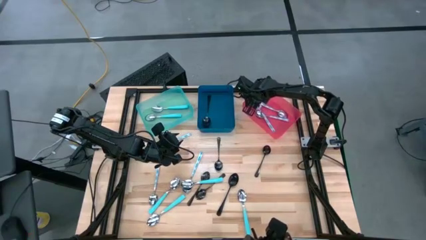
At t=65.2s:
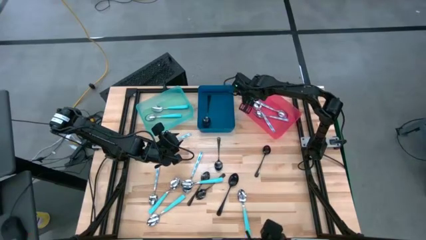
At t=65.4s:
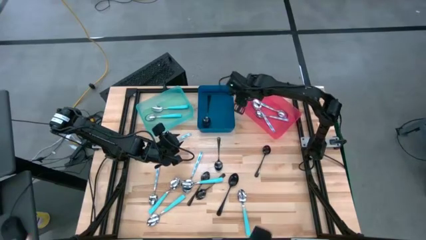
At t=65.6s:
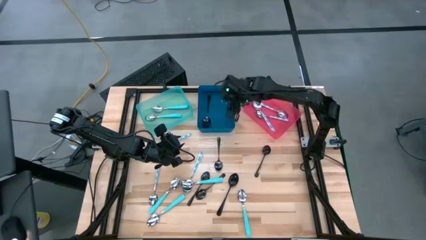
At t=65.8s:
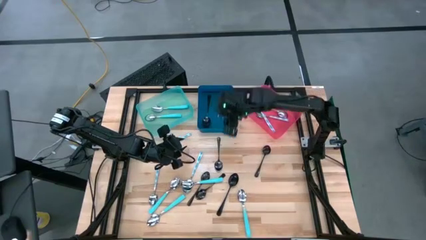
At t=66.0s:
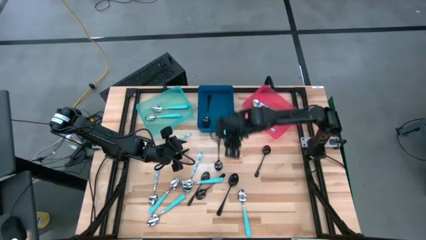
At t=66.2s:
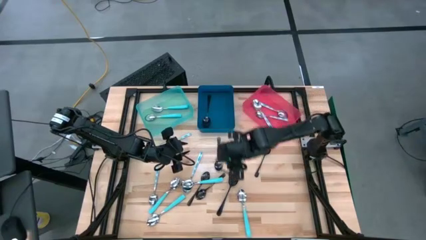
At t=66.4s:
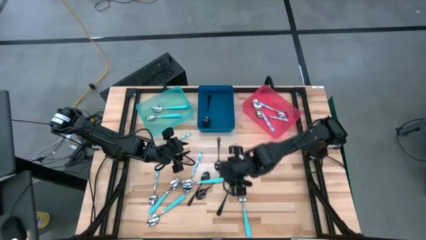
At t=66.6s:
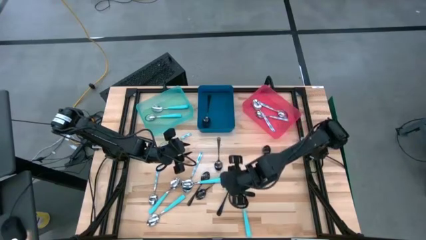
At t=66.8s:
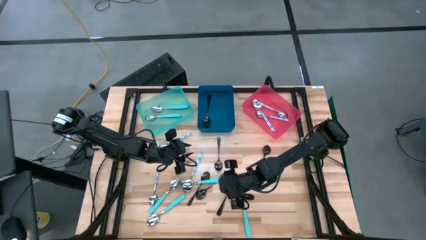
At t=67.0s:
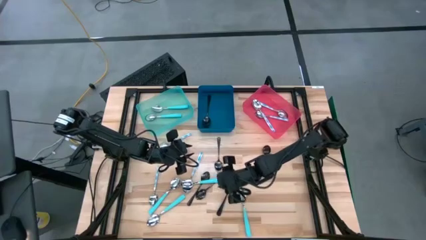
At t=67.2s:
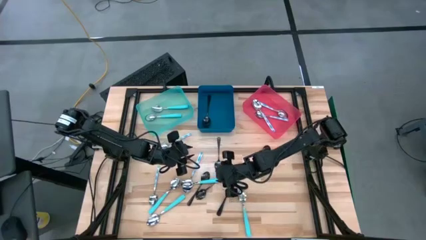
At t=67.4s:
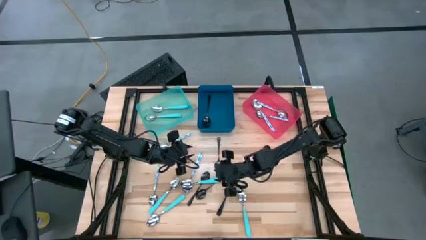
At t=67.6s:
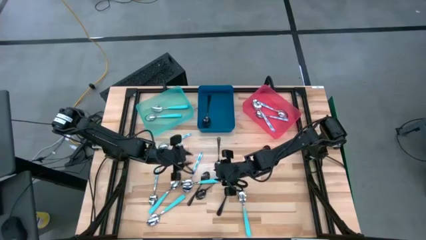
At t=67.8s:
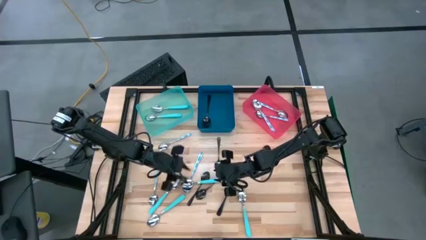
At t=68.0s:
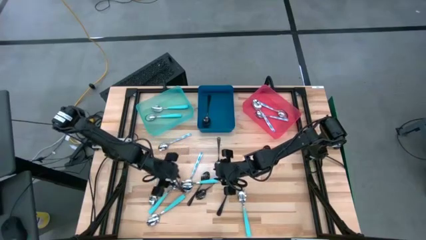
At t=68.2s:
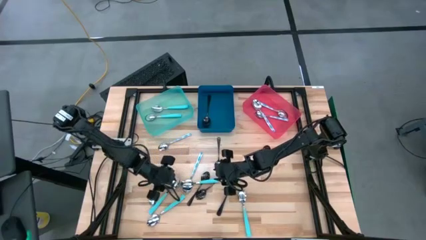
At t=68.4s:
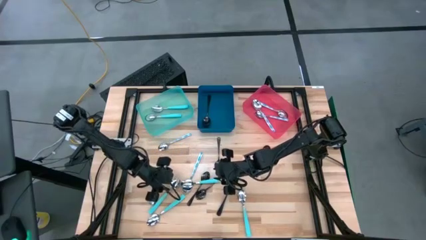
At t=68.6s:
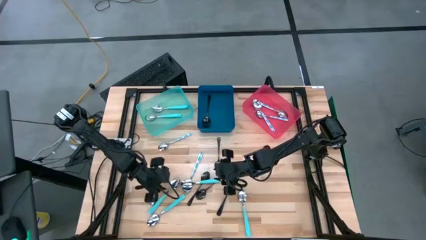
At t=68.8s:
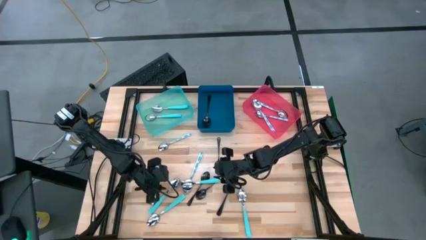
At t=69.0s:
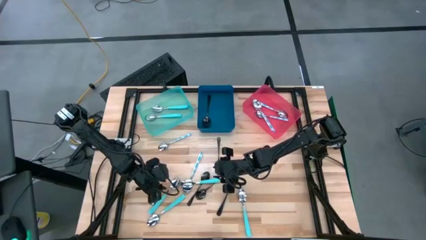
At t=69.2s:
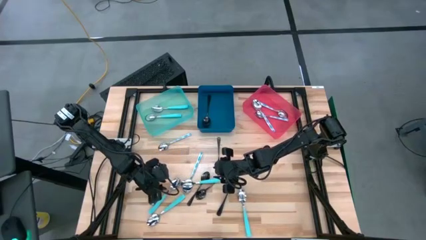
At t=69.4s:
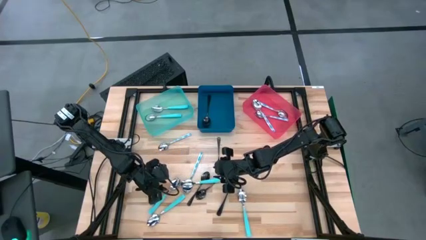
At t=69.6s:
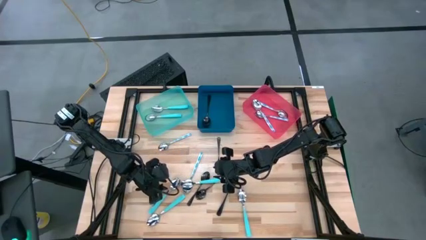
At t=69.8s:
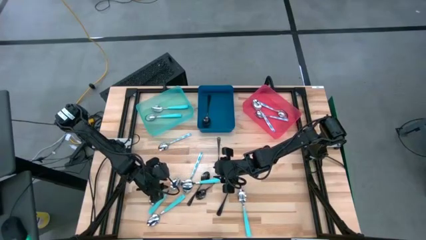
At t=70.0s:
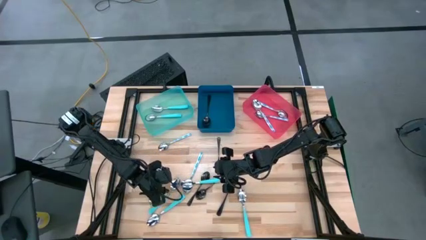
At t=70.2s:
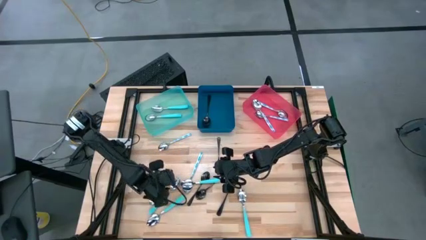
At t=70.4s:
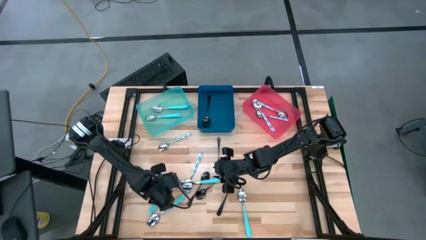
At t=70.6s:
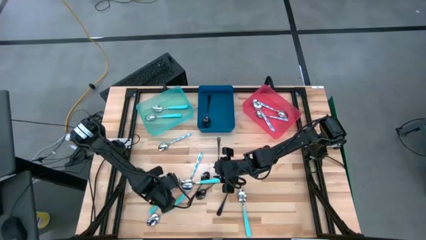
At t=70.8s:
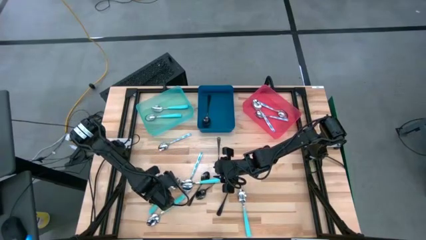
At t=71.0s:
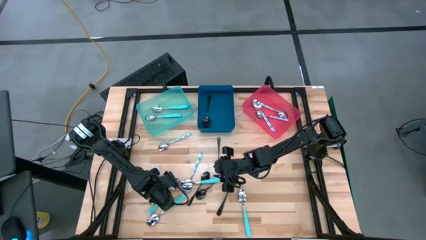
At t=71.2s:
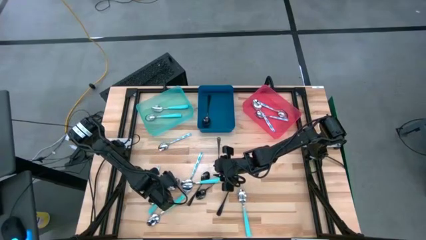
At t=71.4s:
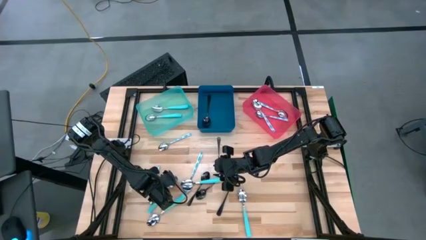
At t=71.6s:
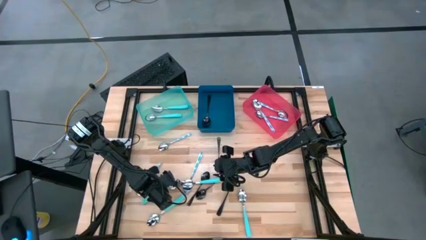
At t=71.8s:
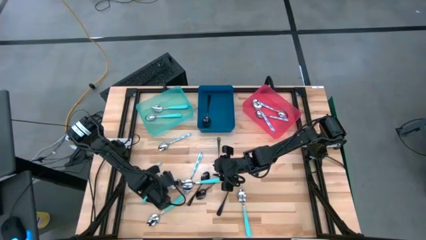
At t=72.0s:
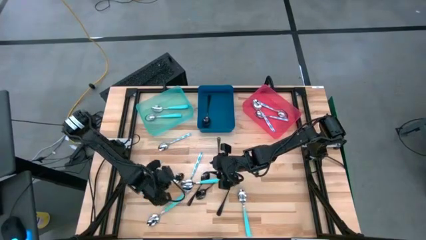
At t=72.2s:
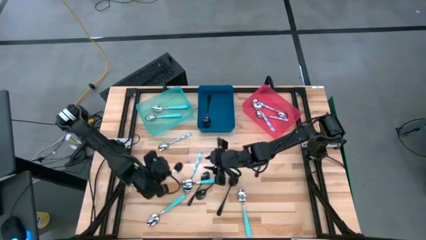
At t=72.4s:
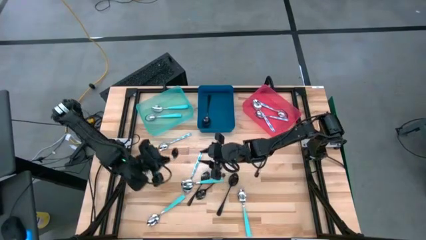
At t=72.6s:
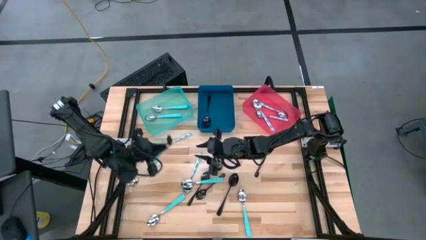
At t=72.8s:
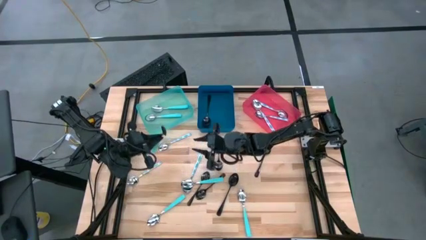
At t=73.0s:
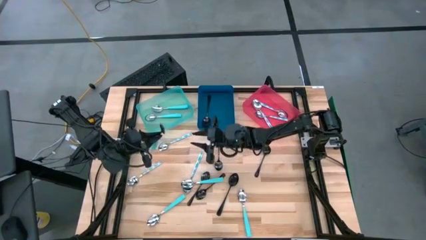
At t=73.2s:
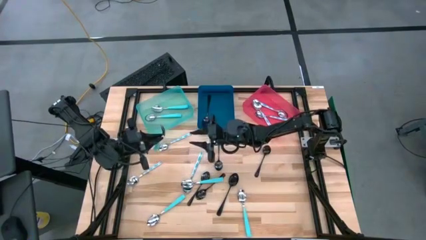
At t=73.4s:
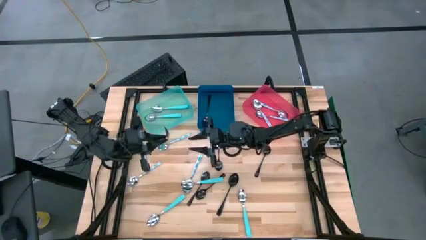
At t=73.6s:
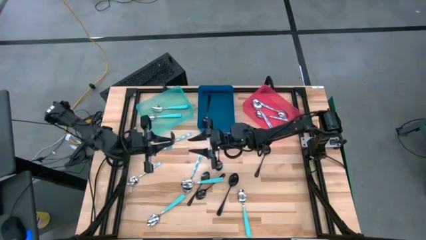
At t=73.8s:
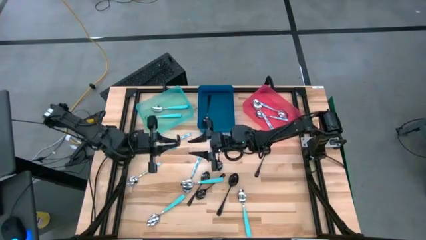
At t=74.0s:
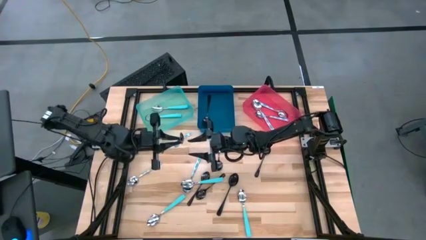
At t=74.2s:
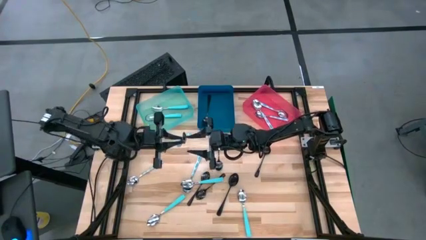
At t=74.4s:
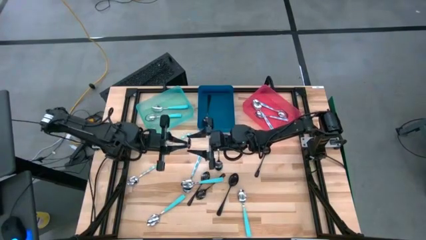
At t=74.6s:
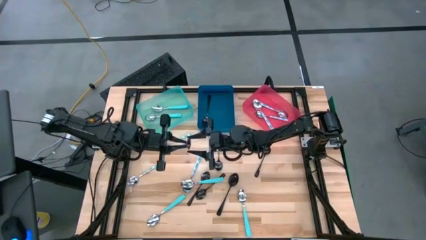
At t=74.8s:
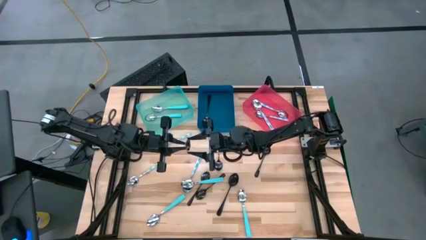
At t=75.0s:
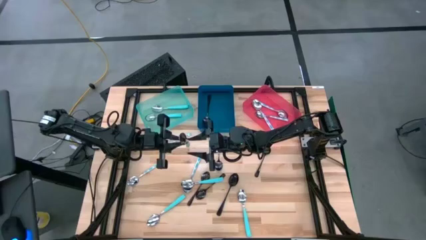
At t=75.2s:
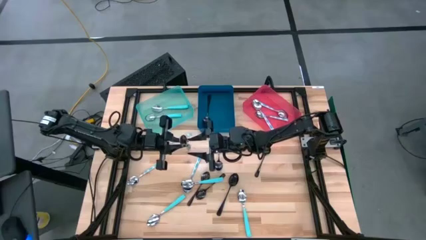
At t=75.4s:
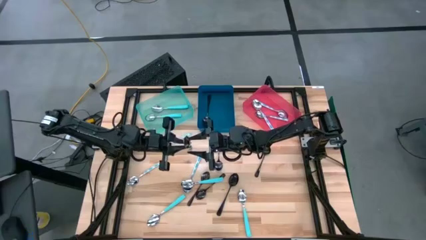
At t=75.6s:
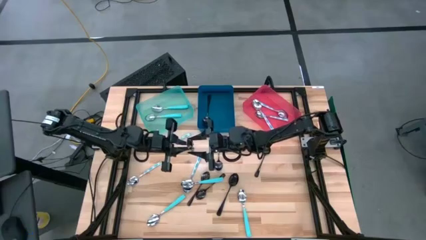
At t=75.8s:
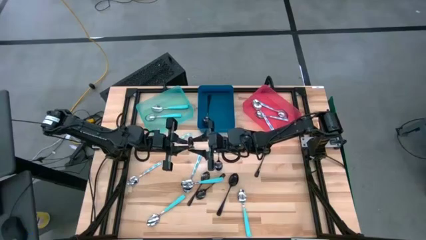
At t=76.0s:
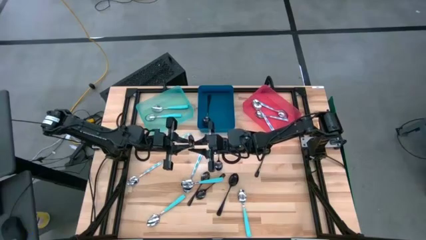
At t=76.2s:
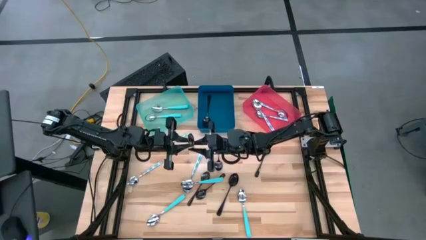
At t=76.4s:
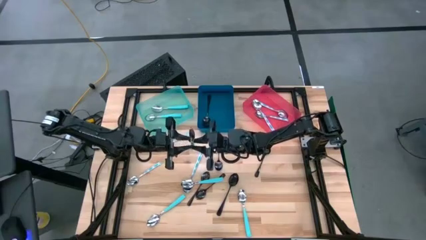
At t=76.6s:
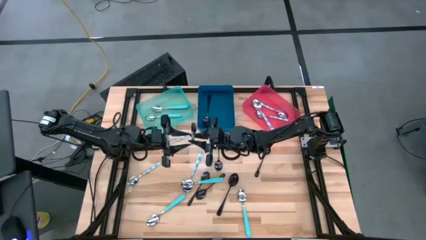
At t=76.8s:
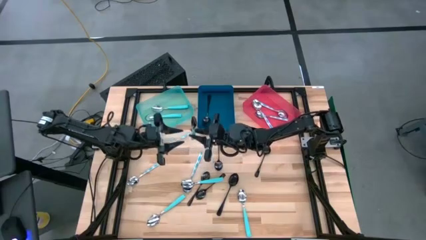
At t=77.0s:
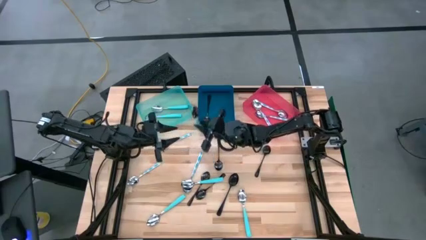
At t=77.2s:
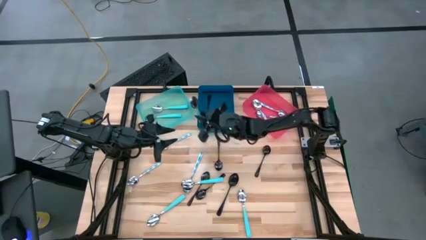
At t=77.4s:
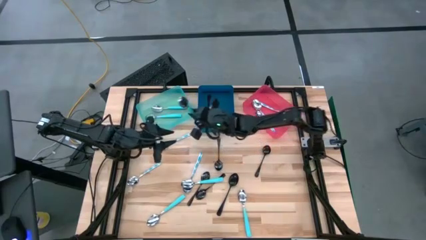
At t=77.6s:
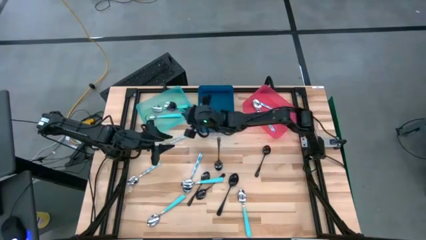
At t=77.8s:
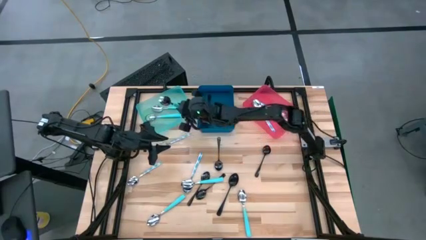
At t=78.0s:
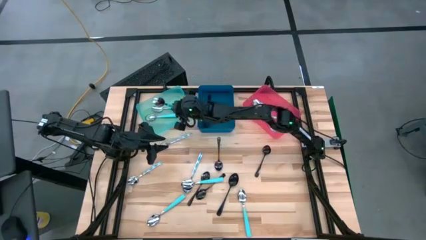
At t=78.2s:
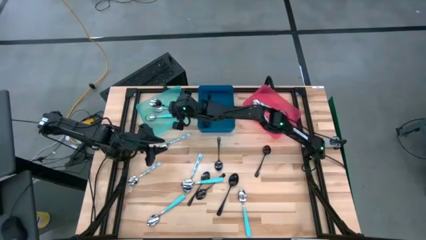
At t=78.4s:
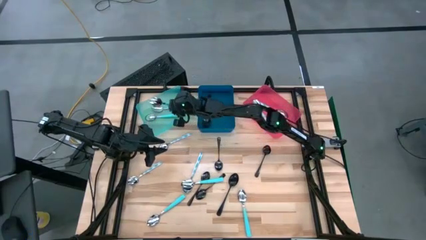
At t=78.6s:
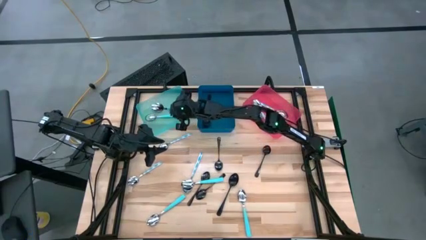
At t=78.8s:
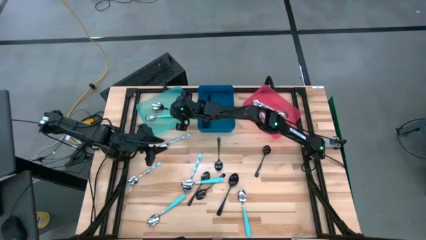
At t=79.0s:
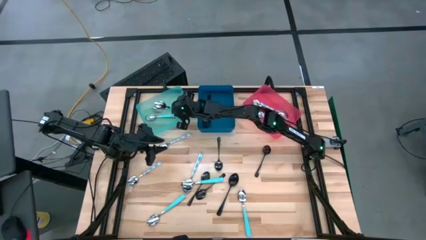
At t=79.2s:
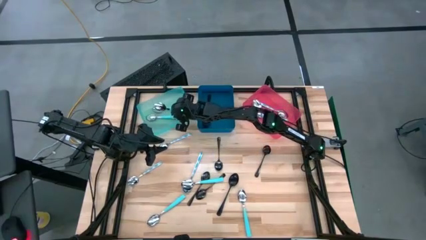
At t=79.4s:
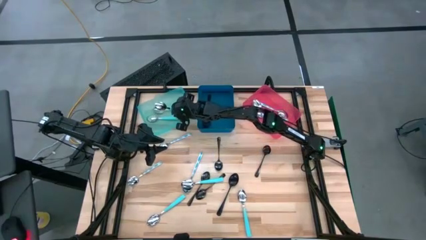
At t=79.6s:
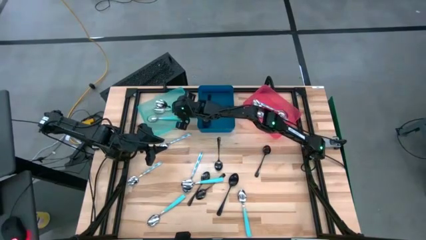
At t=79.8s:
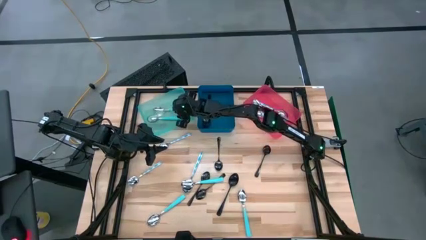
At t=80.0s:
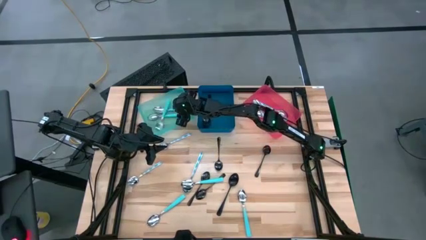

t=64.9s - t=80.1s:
Task: Sort silverware by color (type)
Put the blue spoon into the light blue bin
